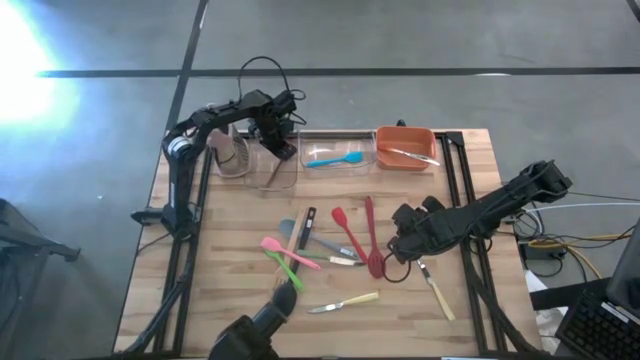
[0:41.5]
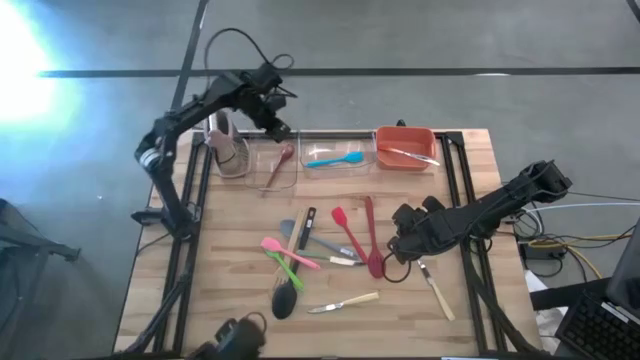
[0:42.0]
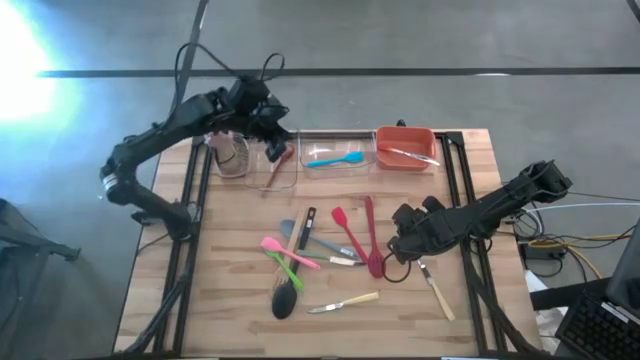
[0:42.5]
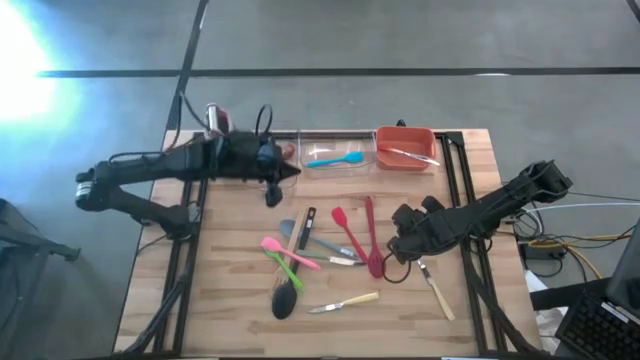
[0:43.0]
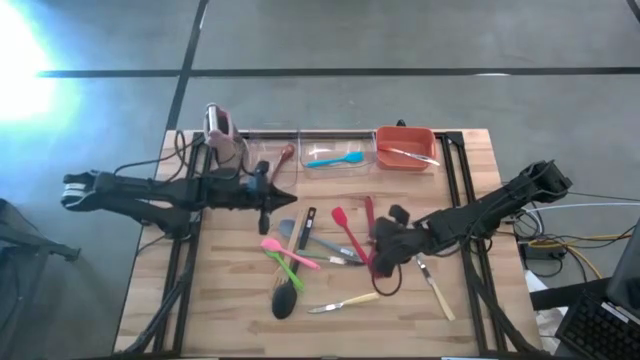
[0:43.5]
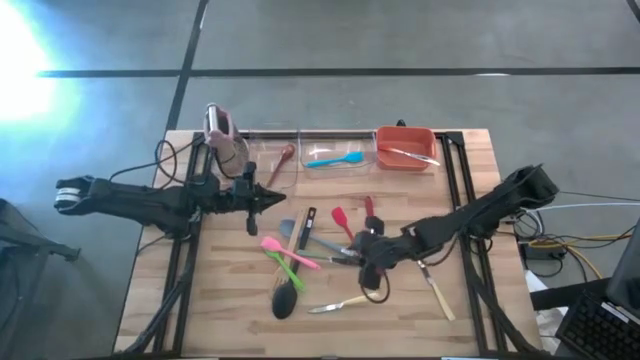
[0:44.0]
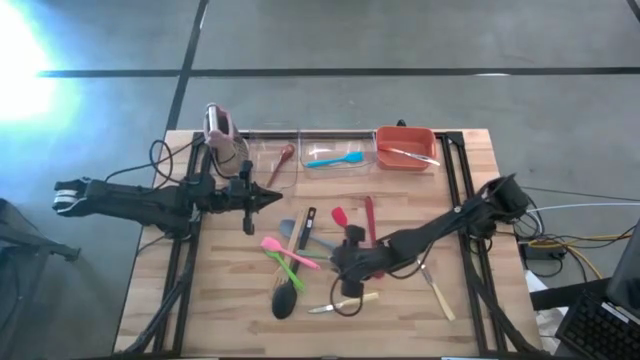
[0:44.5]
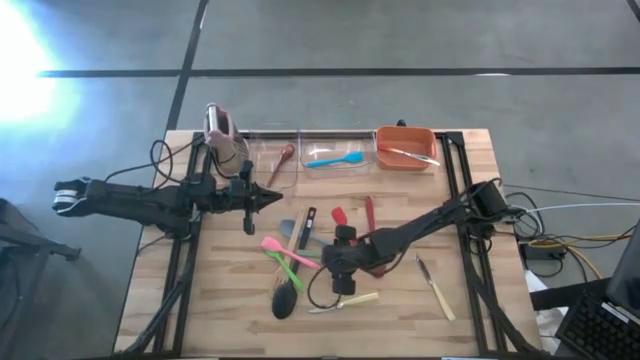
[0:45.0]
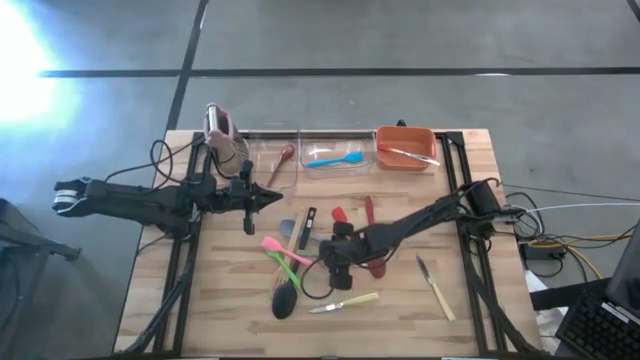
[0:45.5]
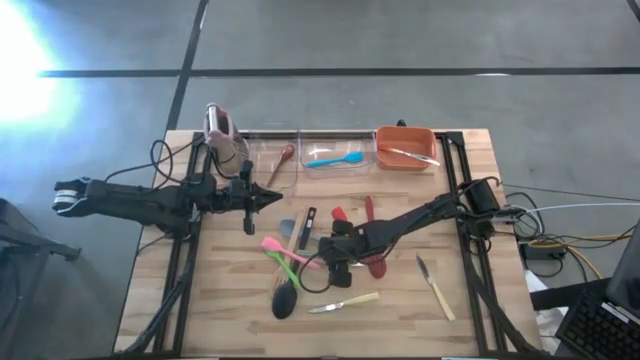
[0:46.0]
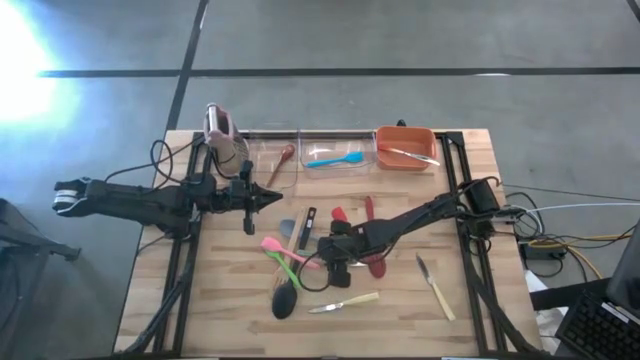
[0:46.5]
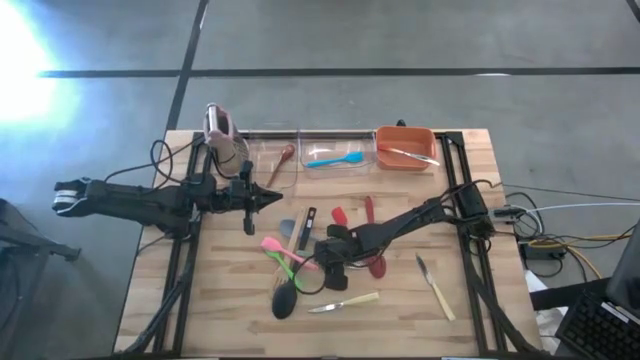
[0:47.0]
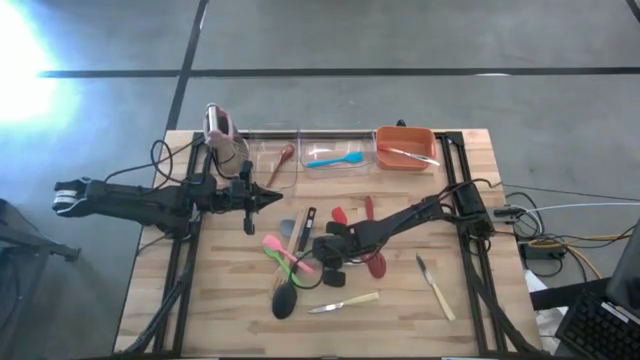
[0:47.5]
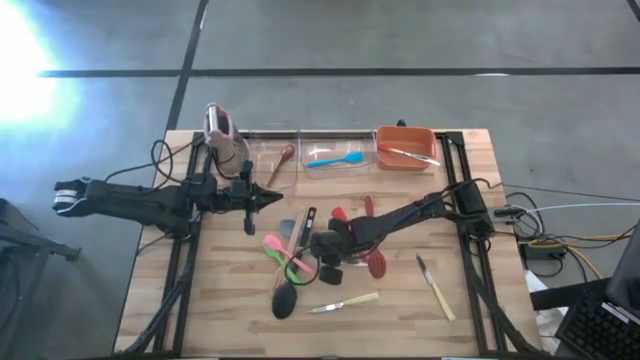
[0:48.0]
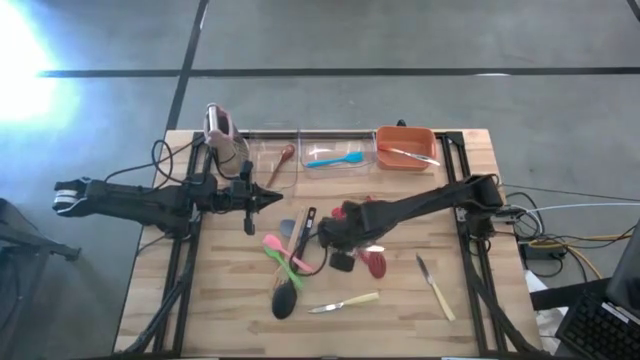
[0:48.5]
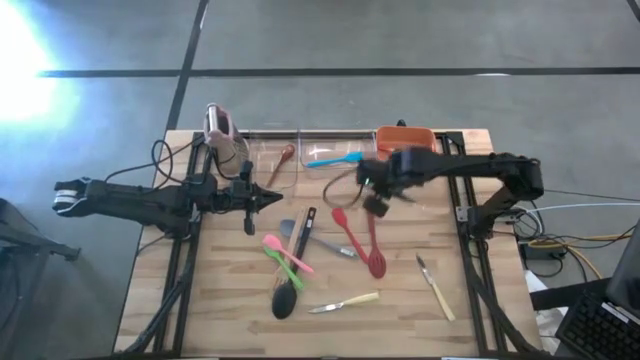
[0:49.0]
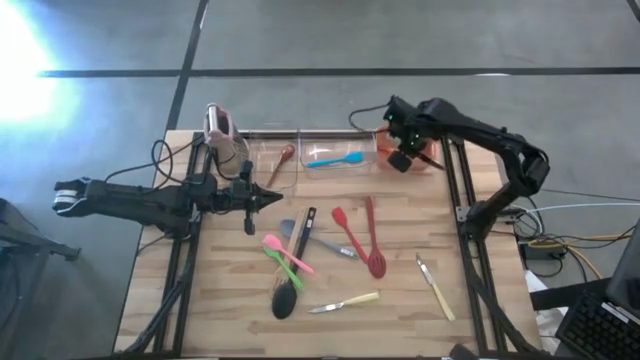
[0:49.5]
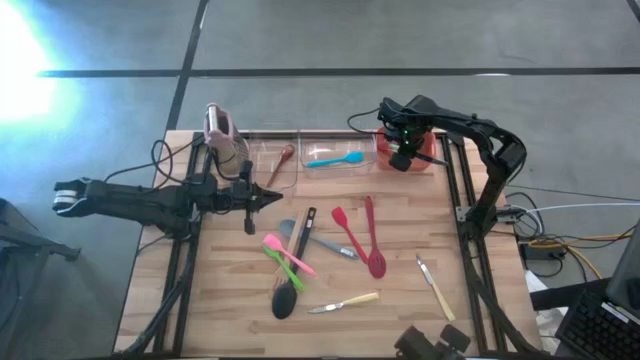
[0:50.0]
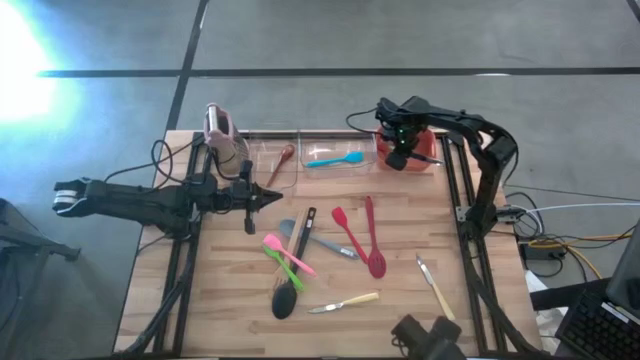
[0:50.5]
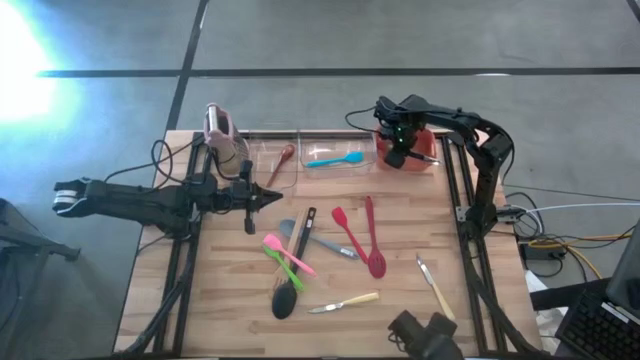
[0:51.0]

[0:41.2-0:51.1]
Task: Pick & Place Kitchen Items
Put the green knife into the orange bin

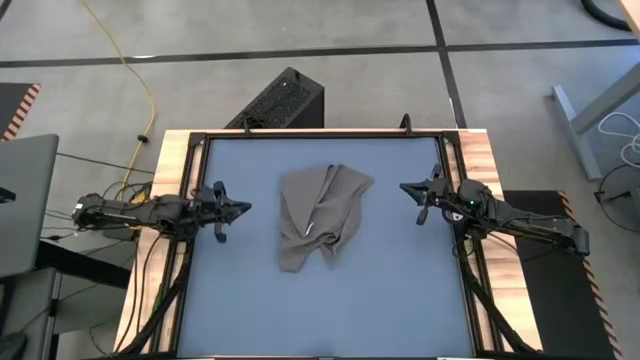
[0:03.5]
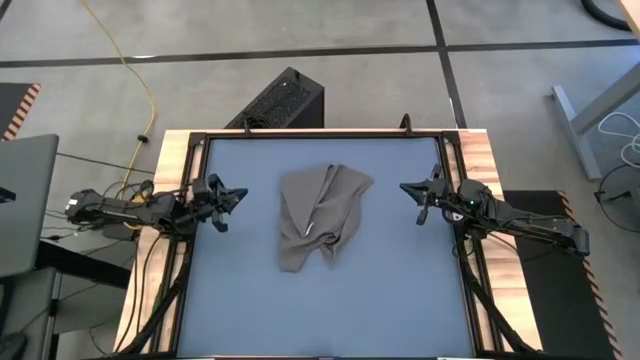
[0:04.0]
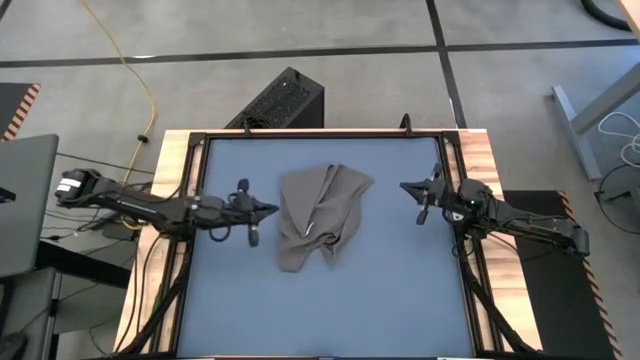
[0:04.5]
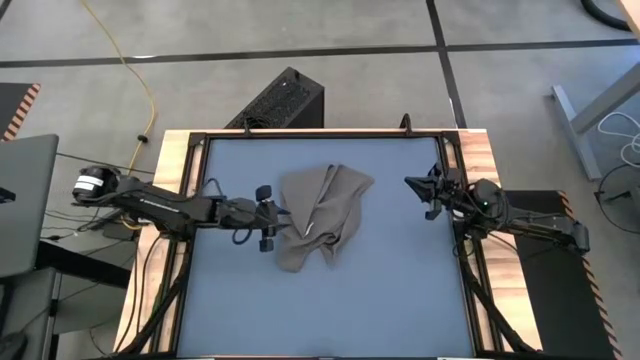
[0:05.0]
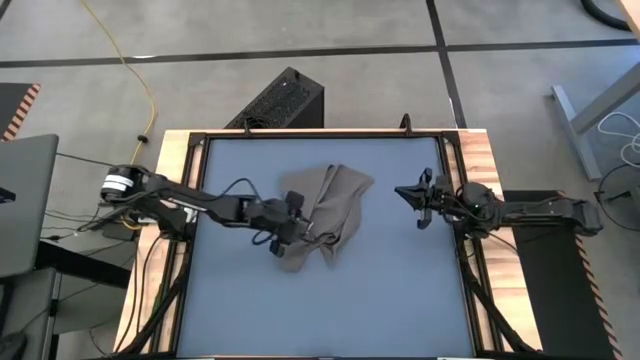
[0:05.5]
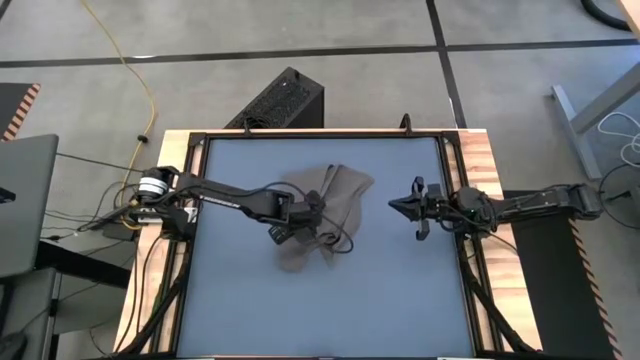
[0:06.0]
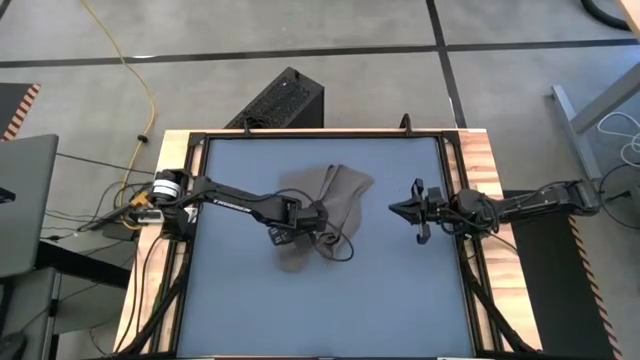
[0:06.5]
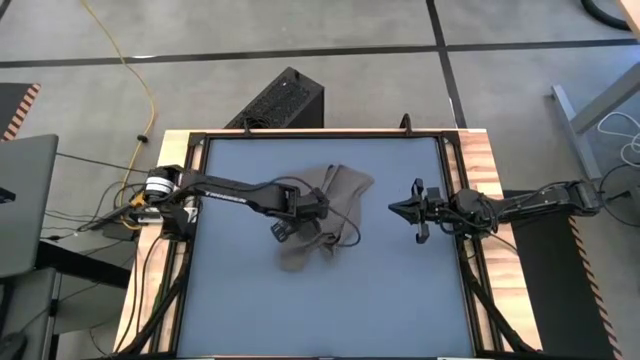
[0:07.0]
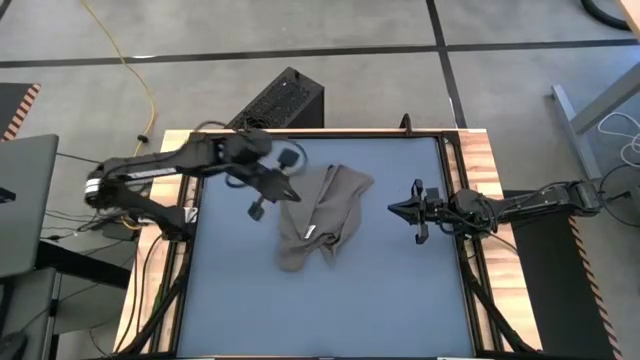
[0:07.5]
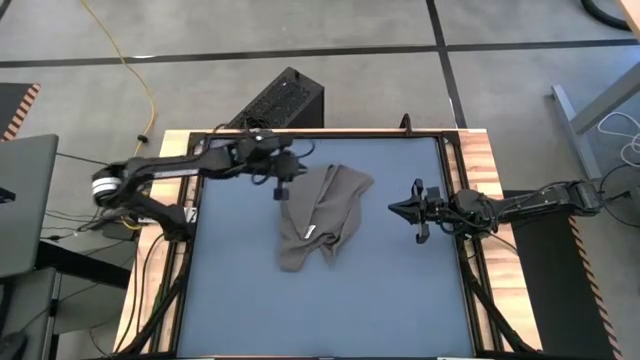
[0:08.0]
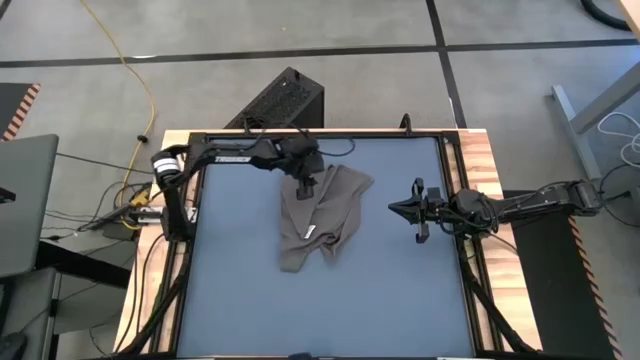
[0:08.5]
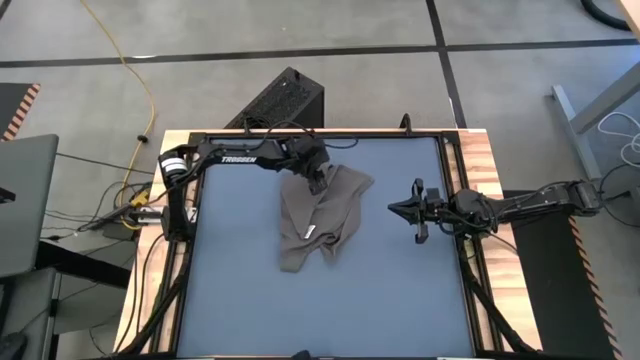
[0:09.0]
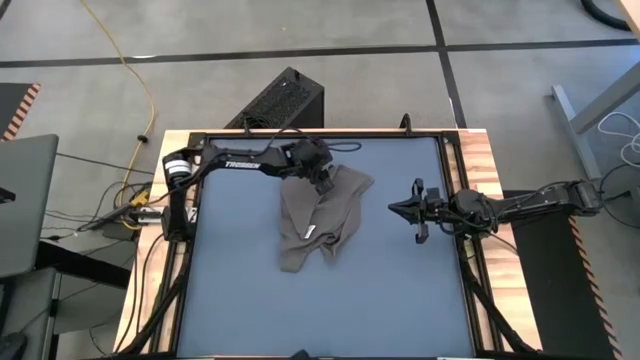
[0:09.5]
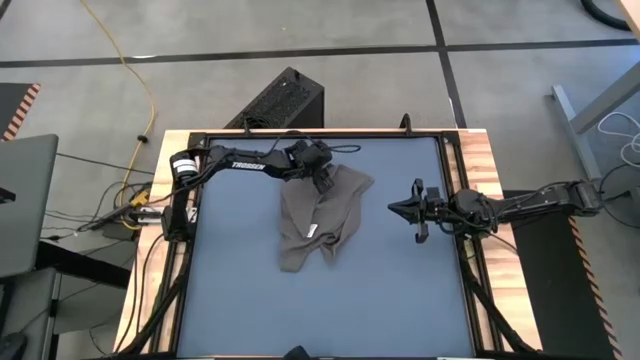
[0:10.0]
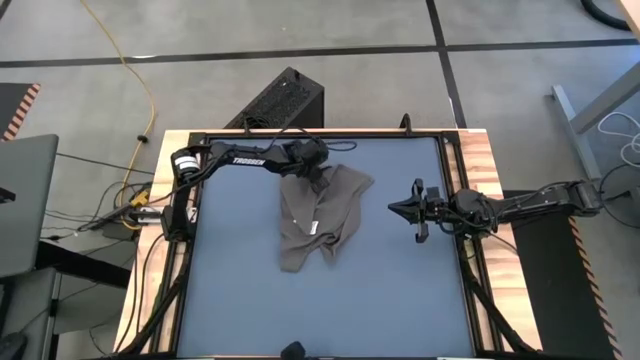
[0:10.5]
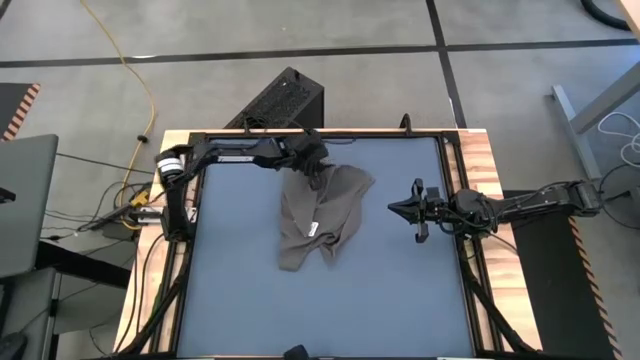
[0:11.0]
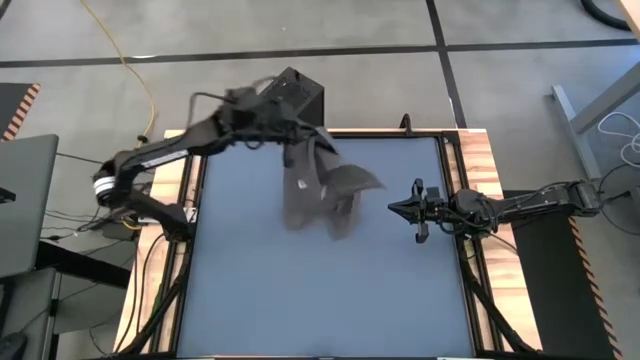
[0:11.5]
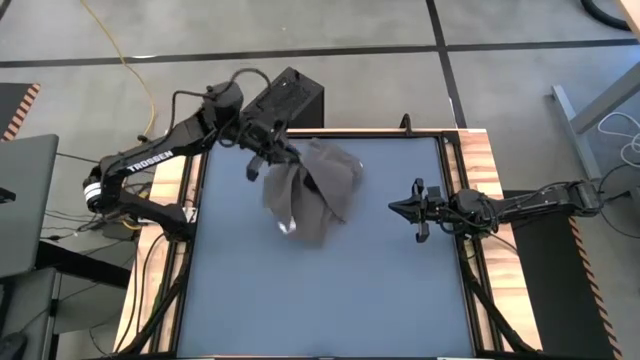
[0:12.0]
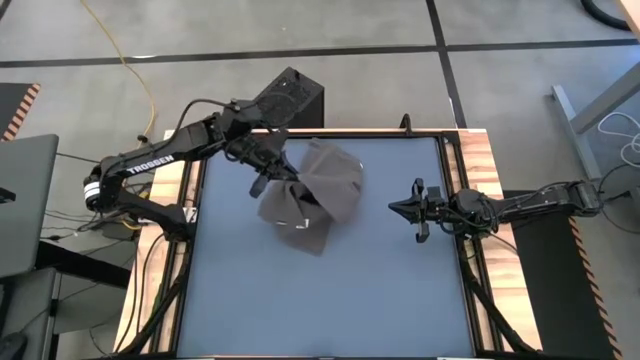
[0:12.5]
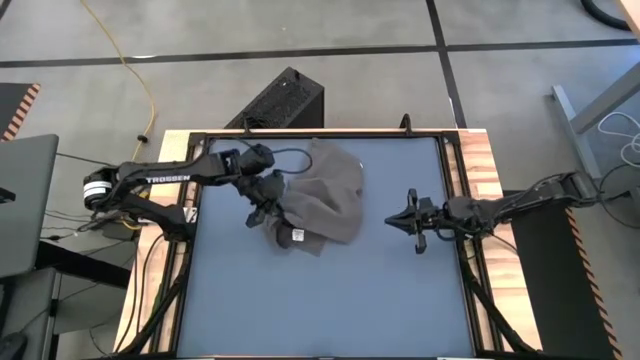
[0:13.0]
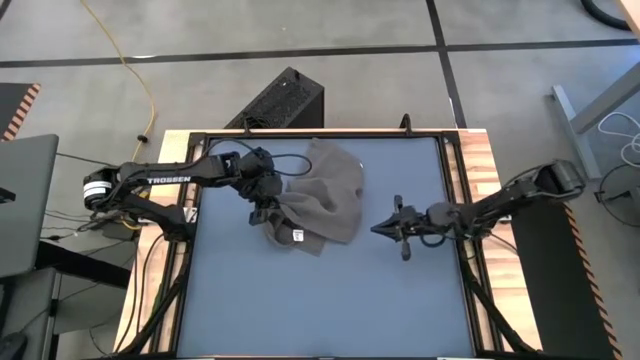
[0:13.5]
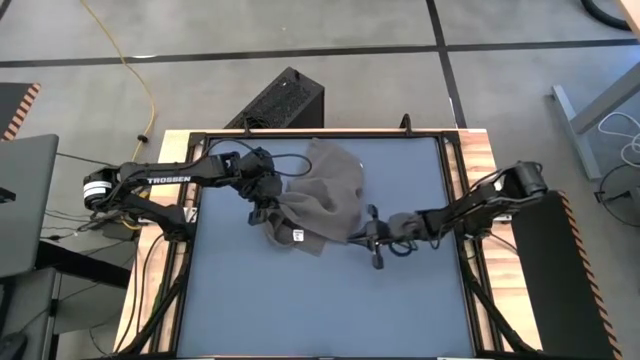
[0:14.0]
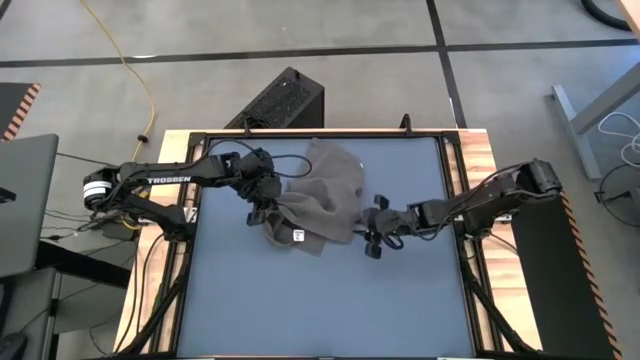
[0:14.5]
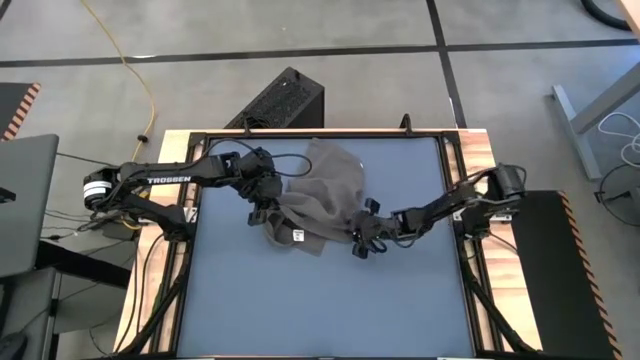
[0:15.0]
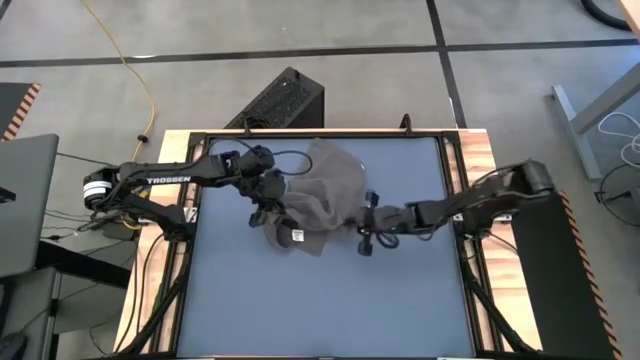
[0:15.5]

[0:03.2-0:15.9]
Task: Roll towel into tight, uniform cylinder
Fold the gray towel
